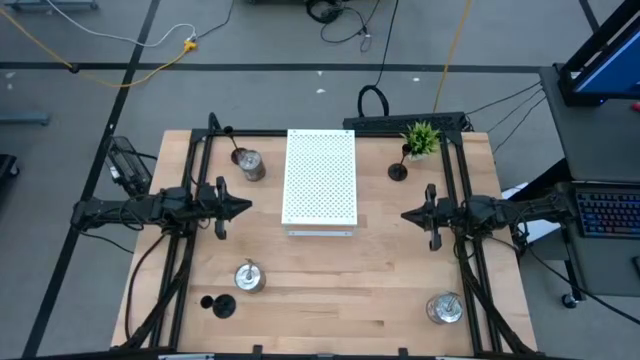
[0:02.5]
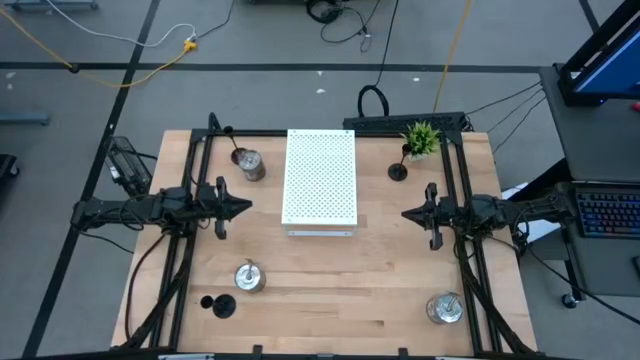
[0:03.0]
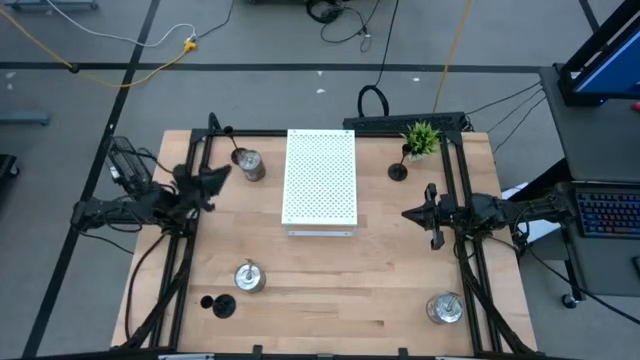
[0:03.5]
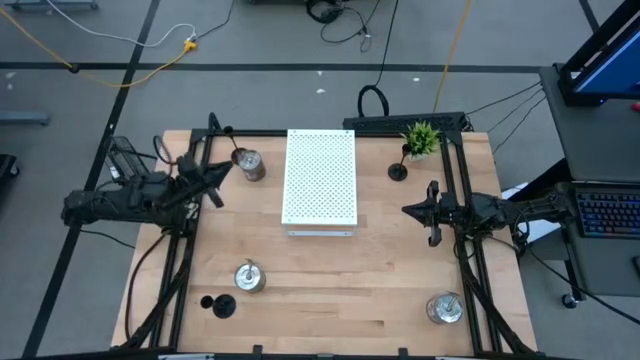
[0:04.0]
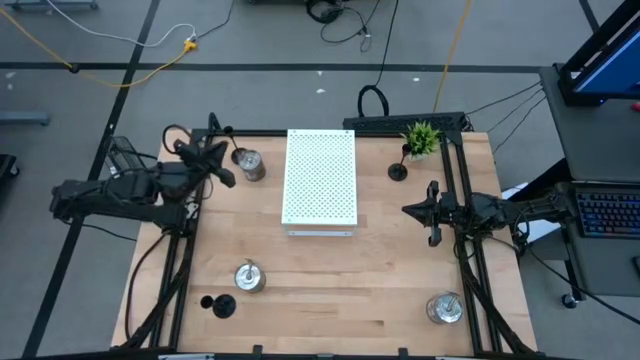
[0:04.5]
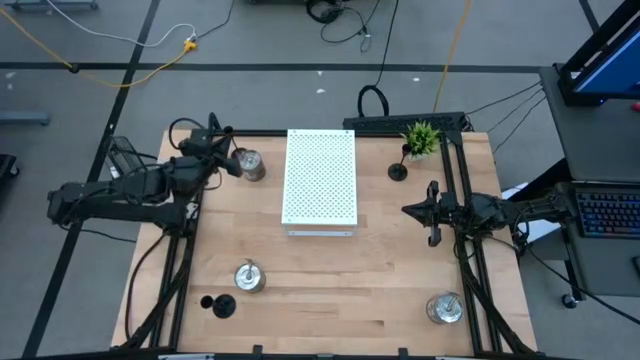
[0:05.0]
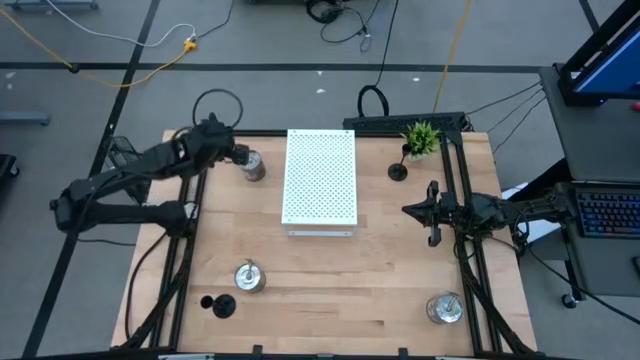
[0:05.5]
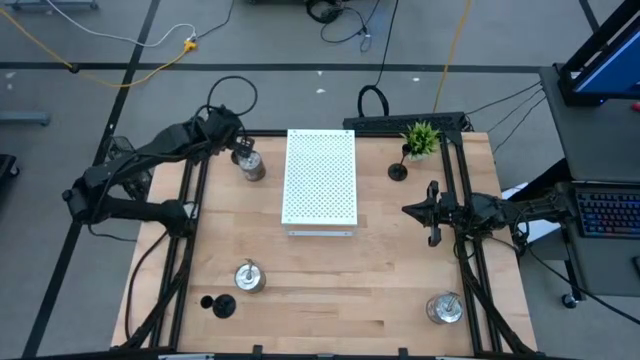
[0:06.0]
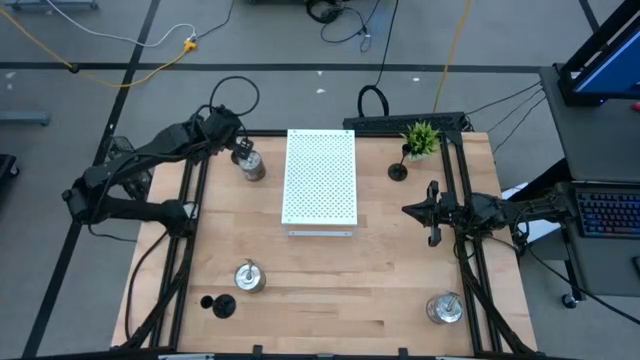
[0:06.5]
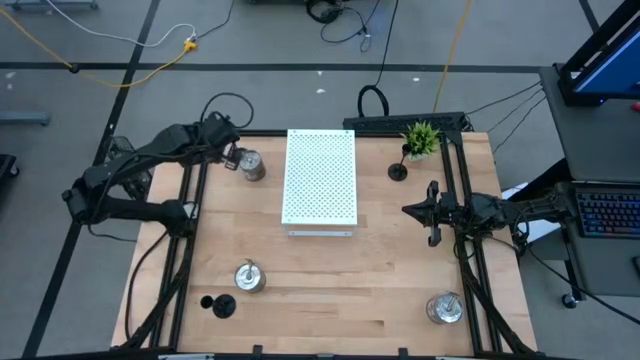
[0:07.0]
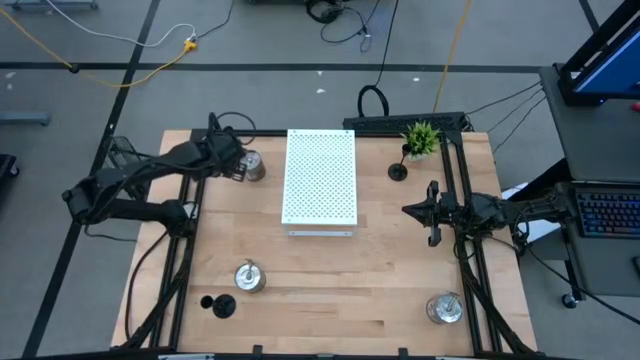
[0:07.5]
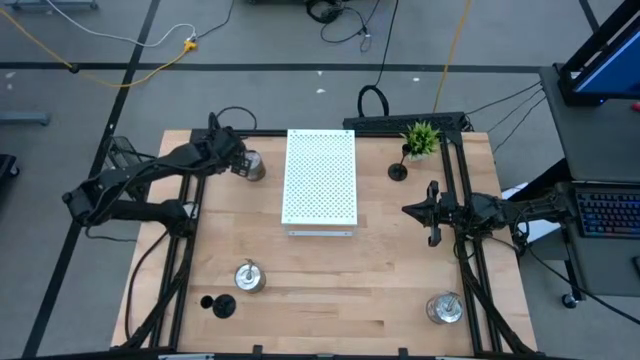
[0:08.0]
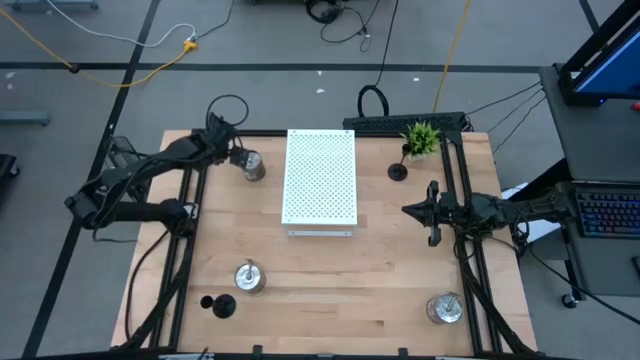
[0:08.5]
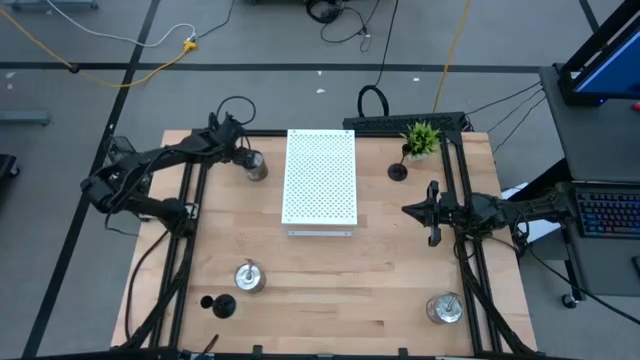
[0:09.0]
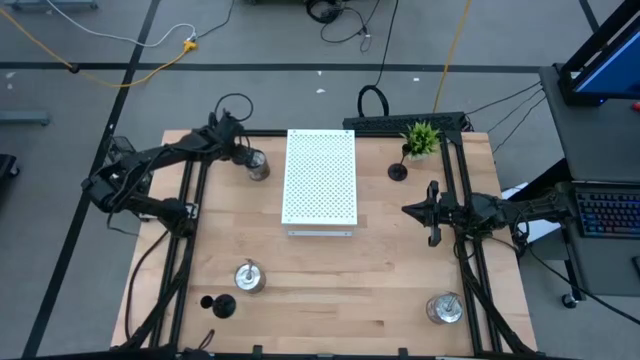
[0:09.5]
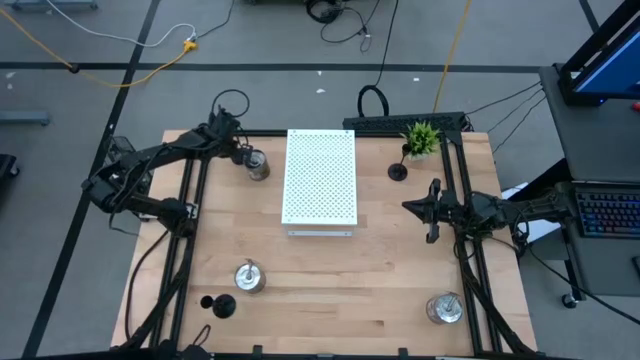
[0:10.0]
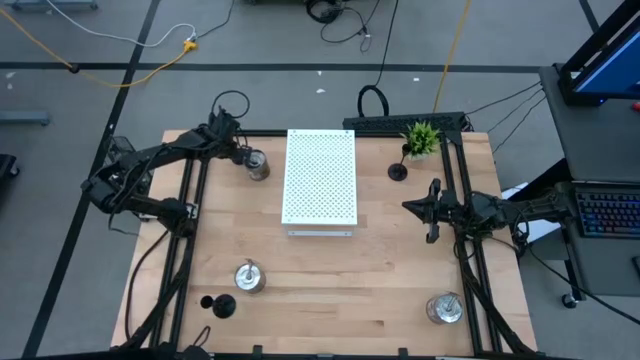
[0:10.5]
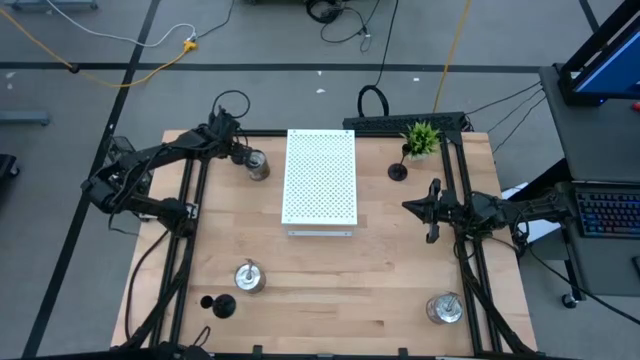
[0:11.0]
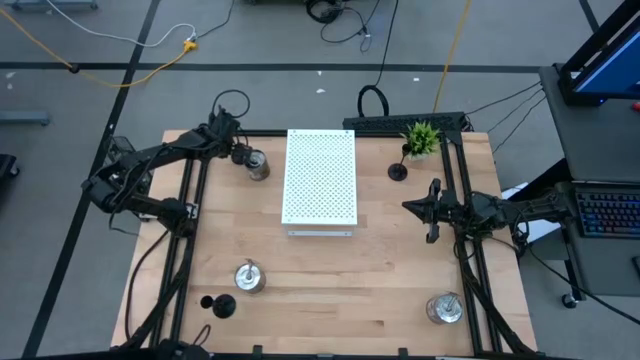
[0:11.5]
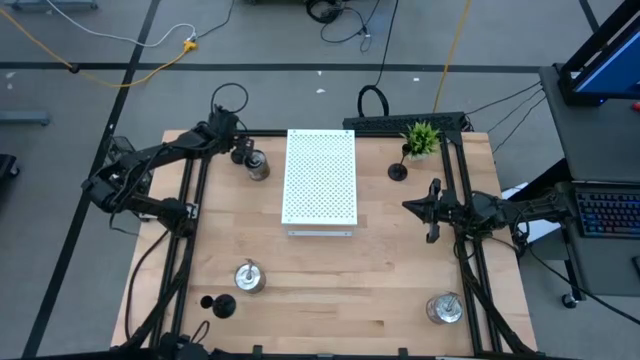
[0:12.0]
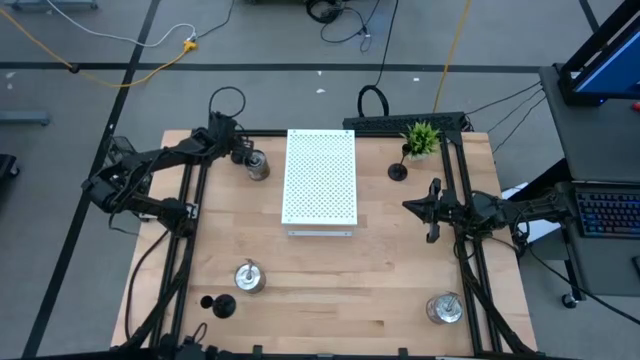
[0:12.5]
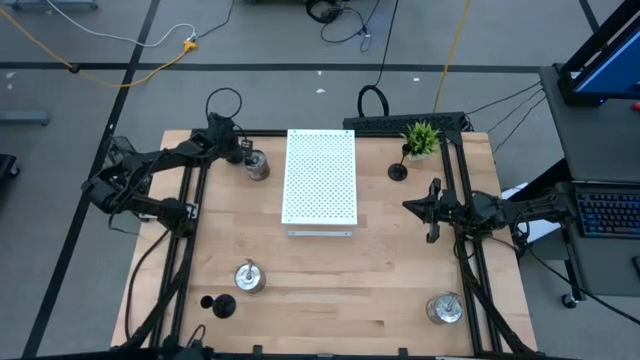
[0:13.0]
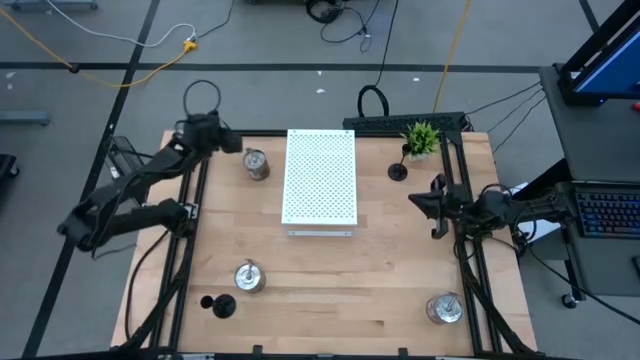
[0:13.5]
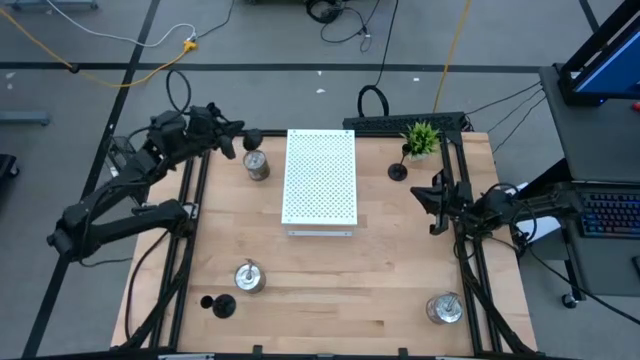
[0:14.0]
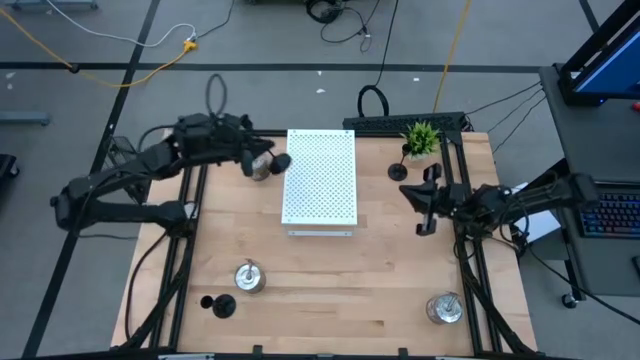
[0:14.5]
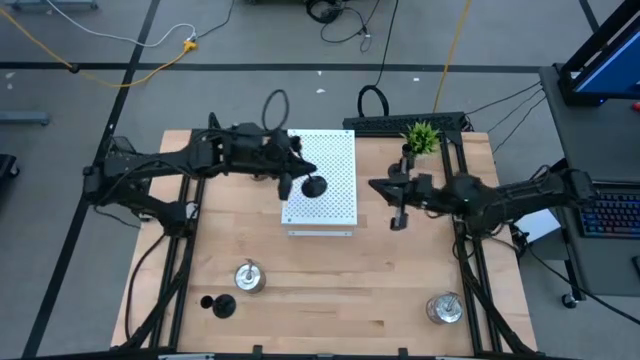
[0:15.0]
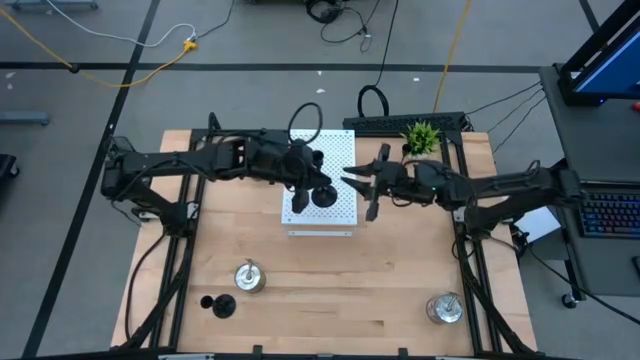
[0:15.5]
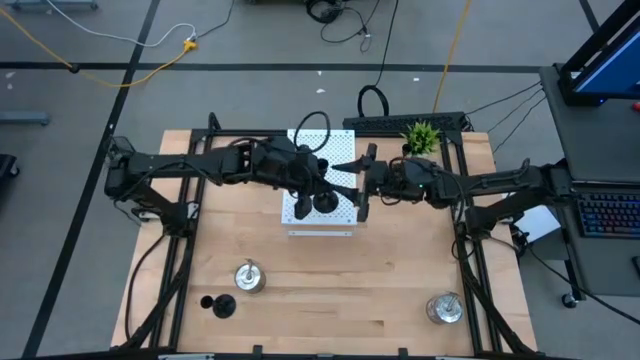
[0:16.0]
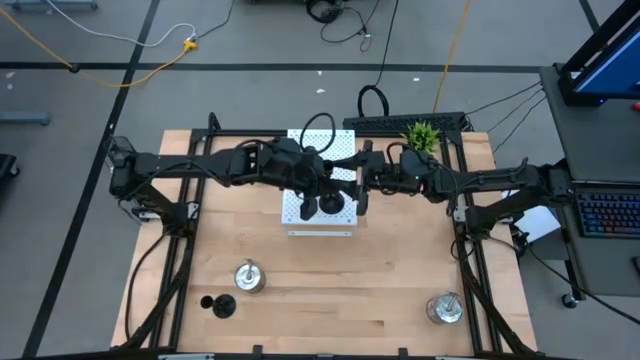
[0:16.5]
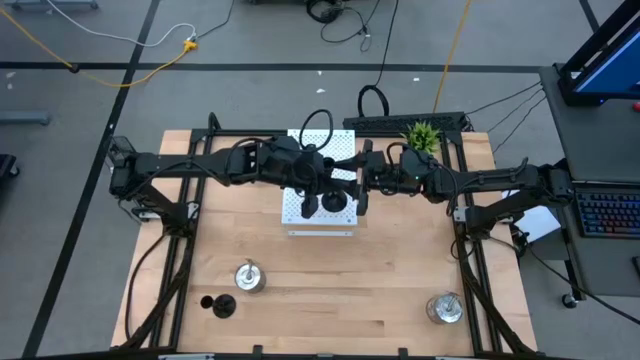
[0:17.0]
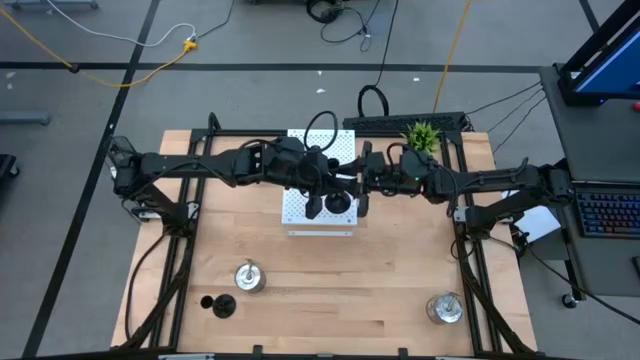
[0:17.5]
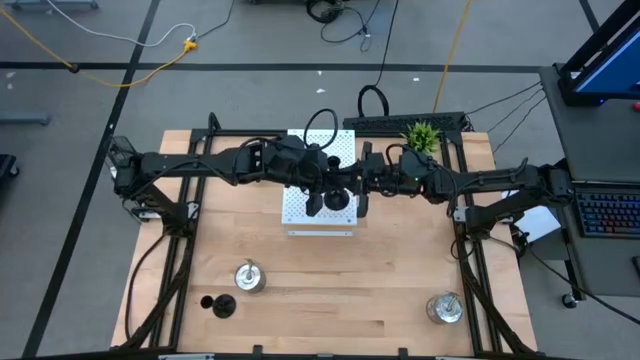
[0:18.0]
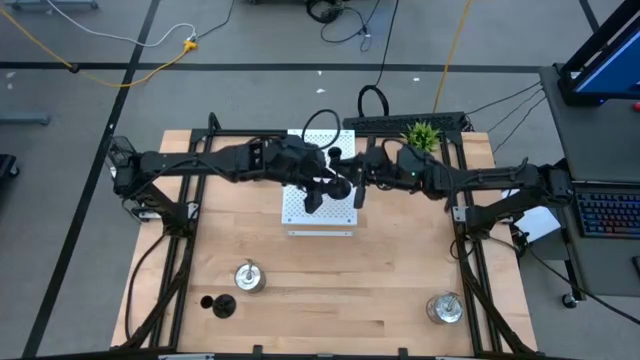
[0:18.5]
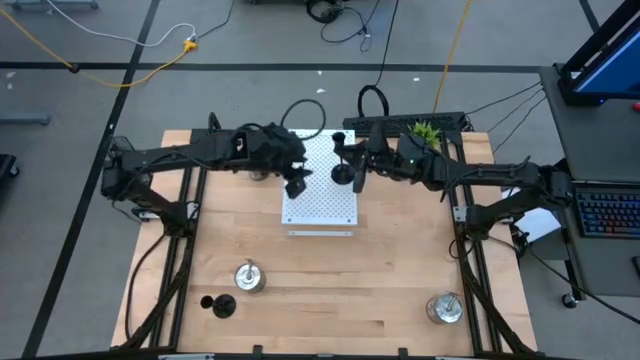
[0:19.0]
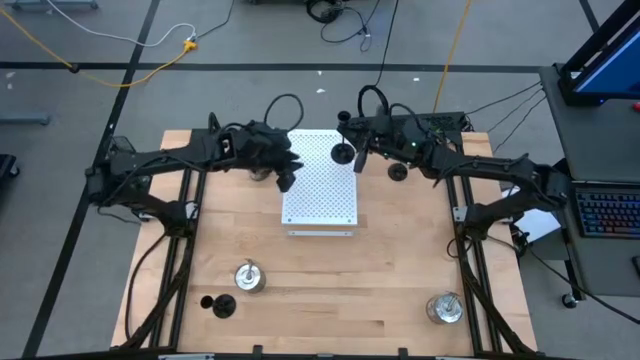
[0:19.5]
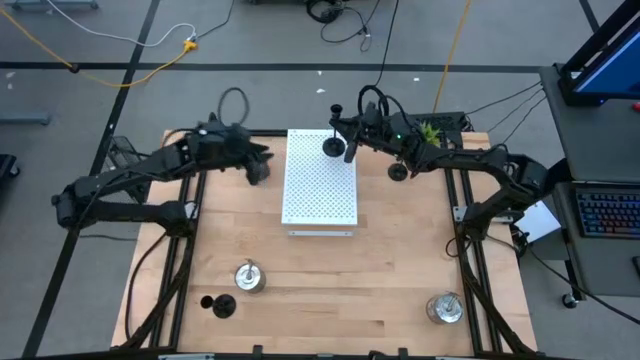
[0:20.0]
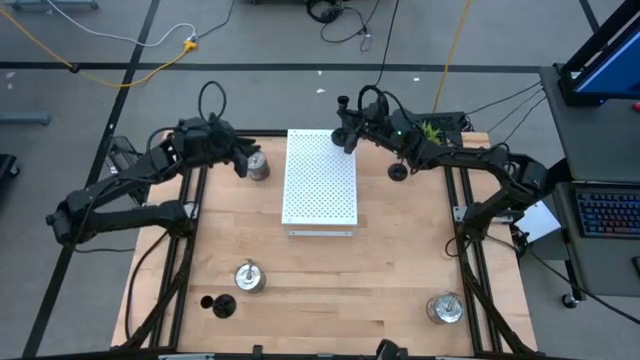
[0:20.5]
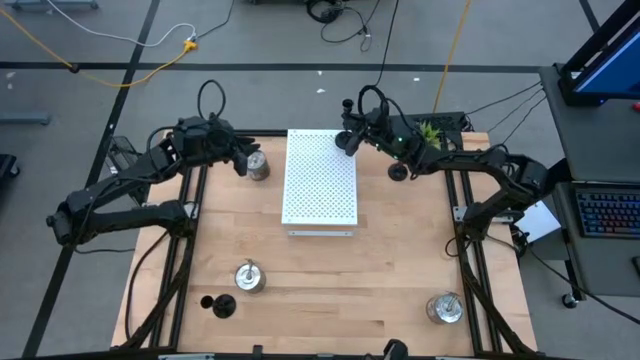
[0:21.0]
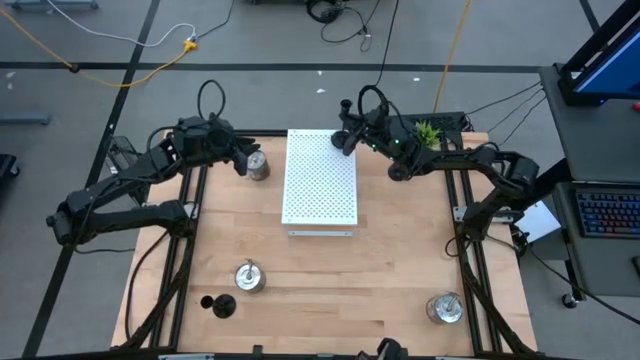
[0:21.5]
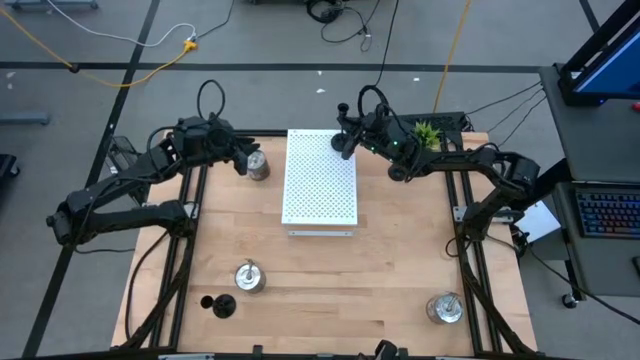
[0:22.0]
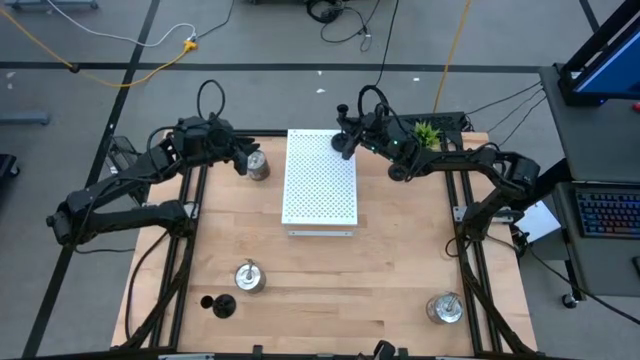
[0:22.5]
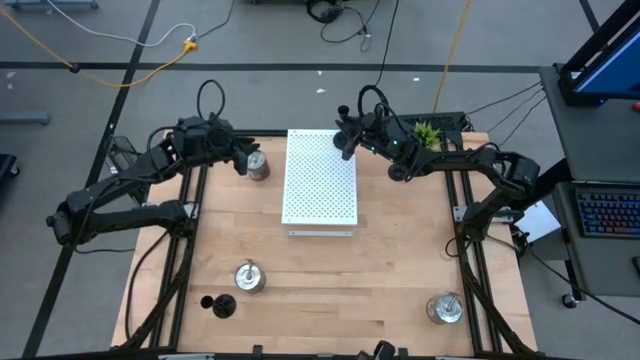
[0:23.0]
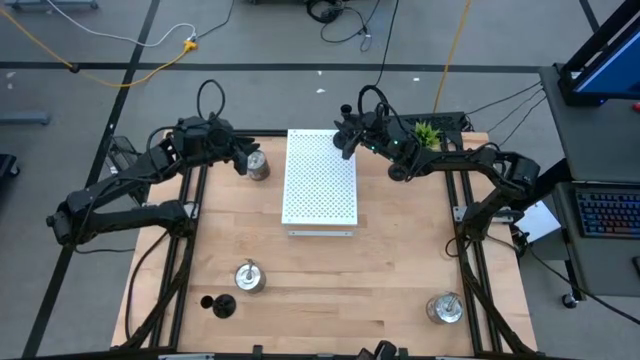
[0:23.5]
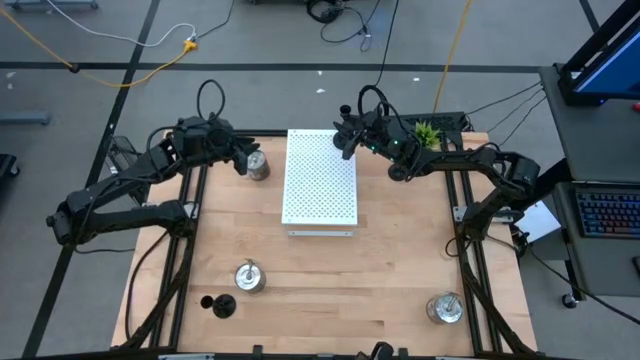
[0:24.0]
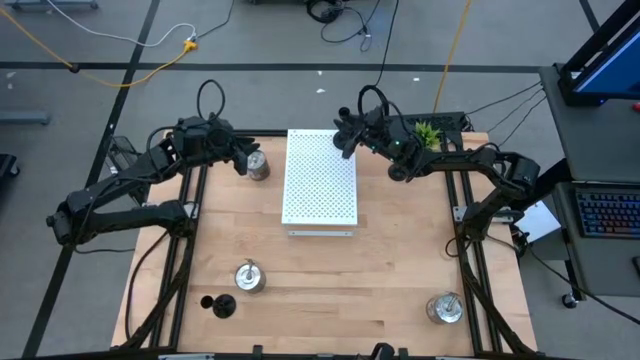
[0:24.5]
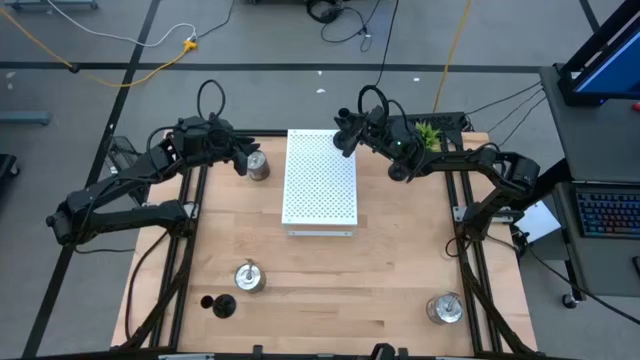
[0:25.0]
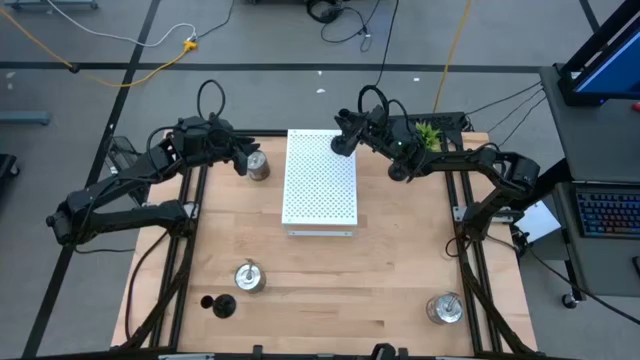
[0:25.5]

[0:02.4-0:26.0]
Task: Pick & Place candle stick holders
Put the top left black candle holder on the shelf
